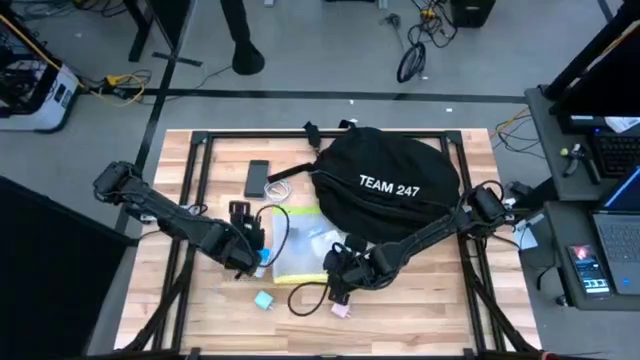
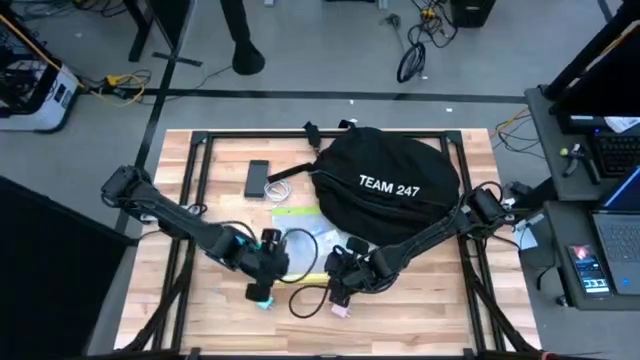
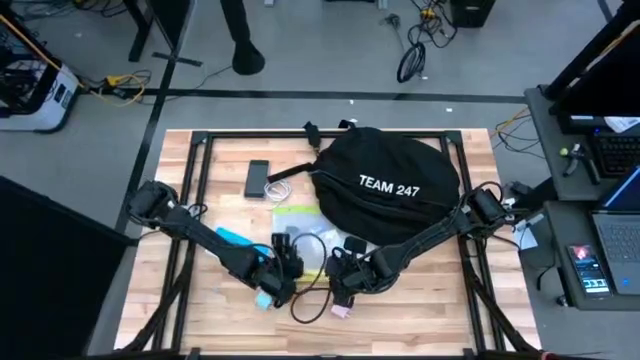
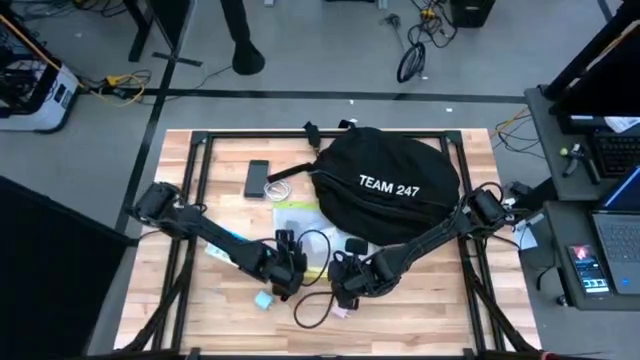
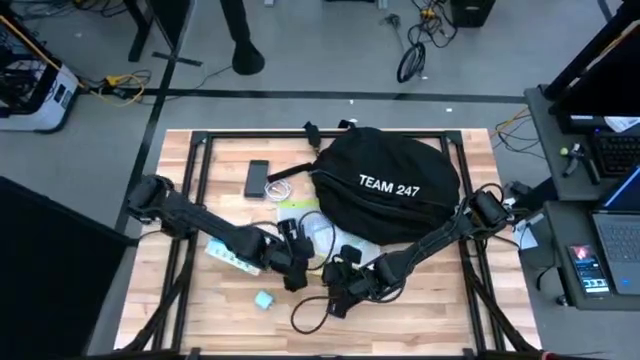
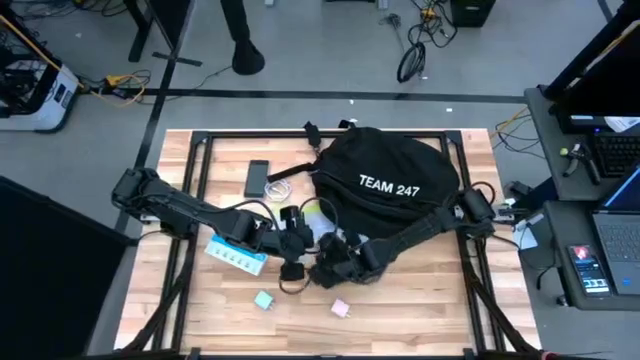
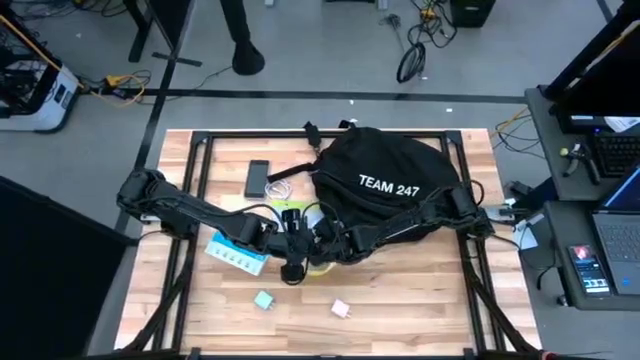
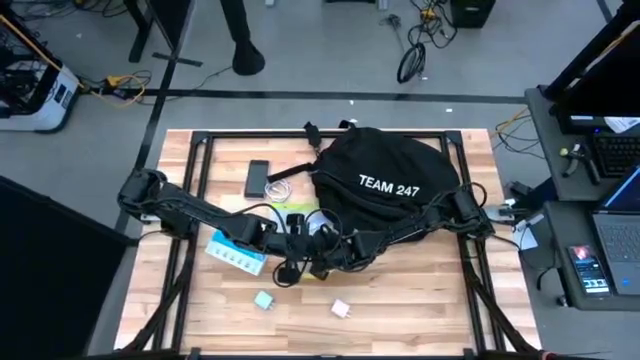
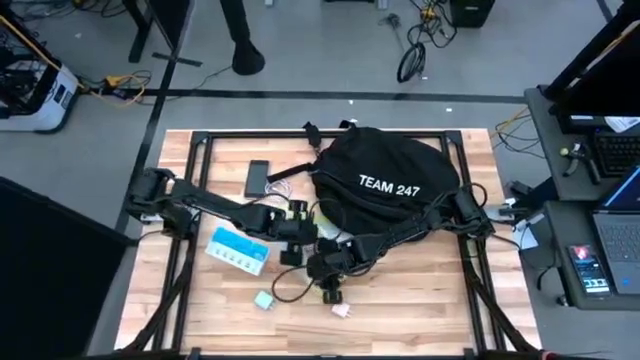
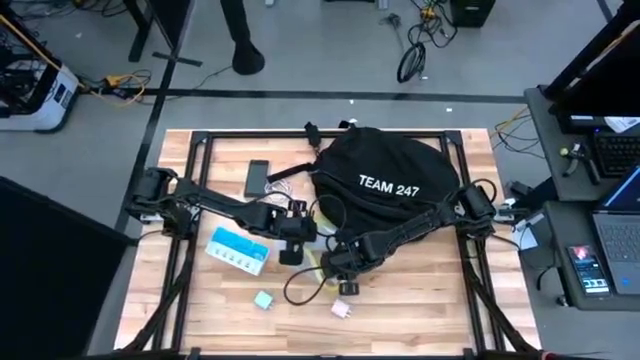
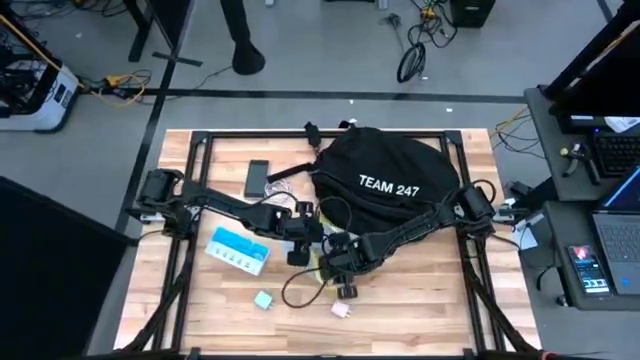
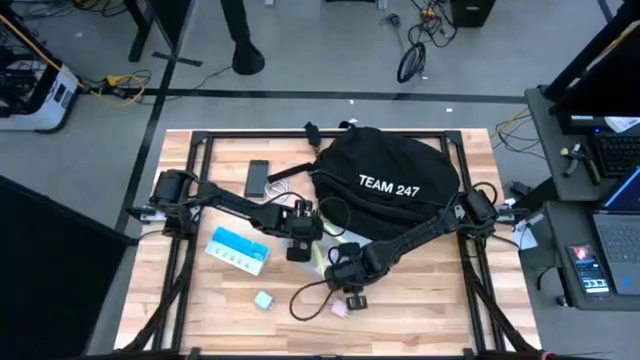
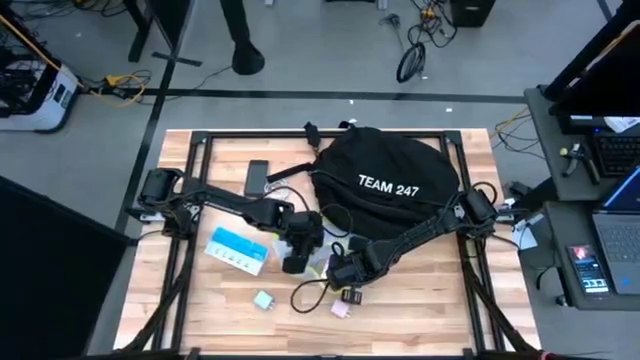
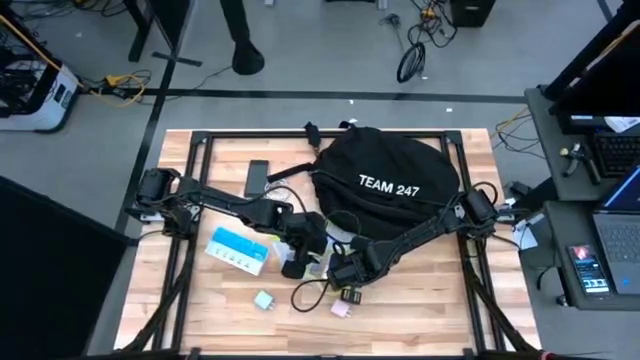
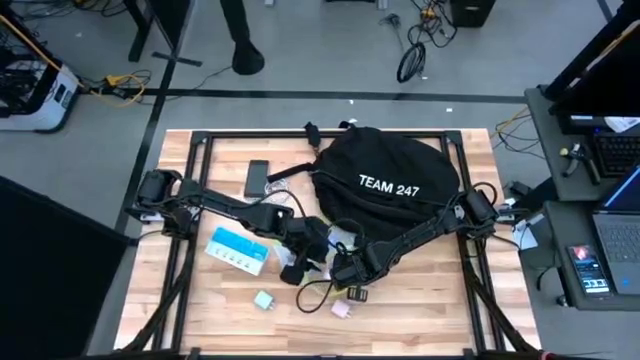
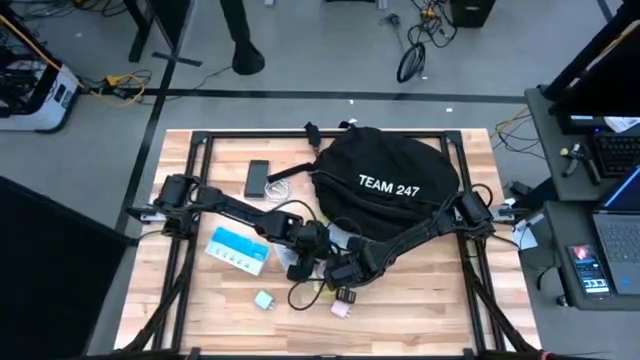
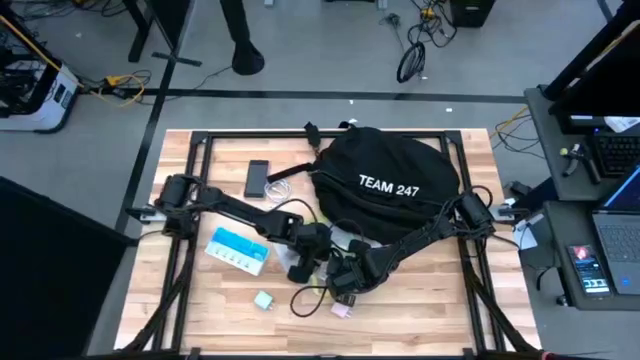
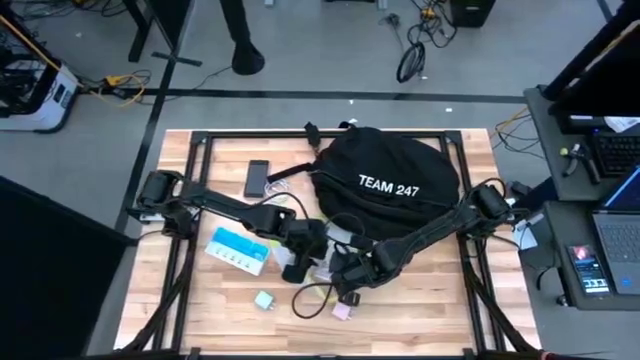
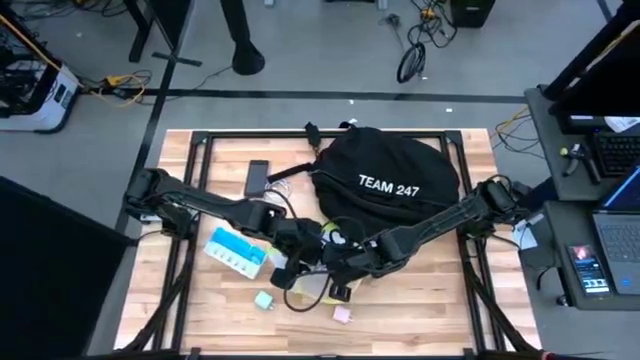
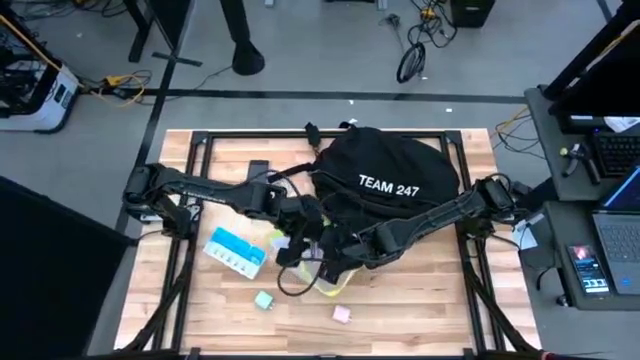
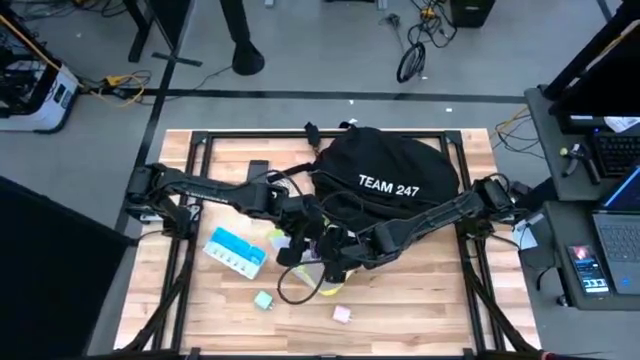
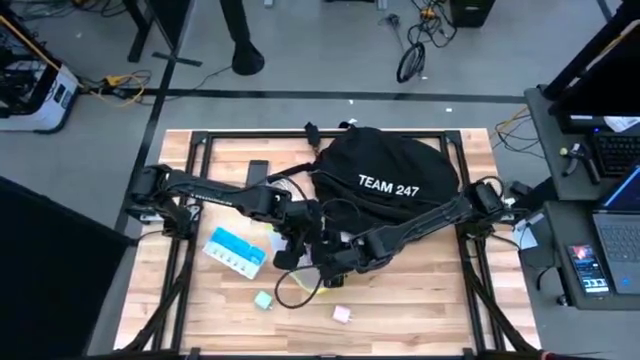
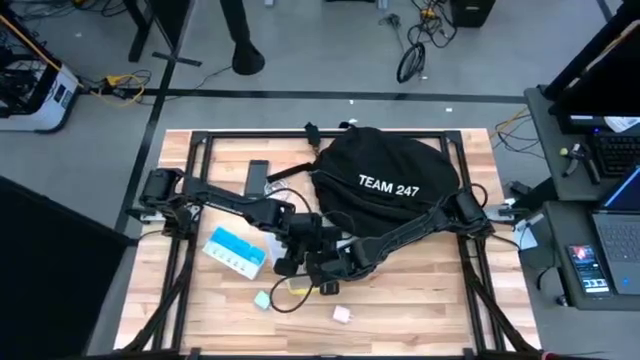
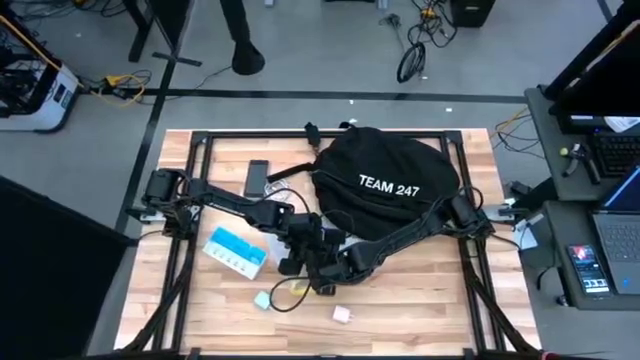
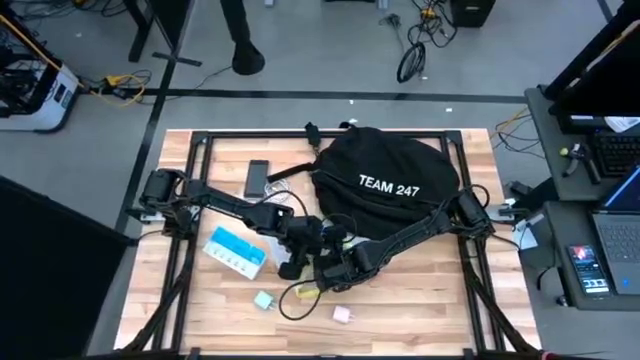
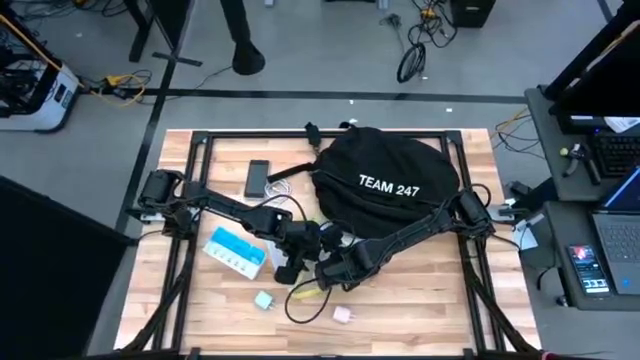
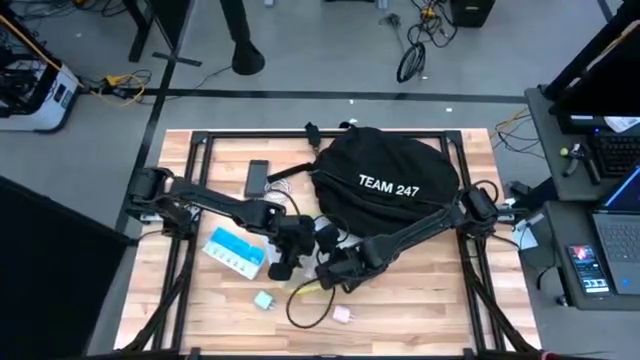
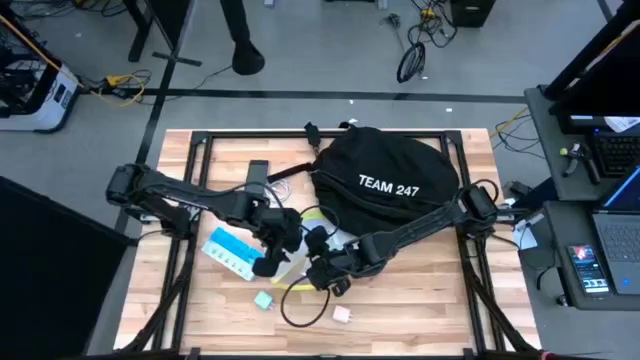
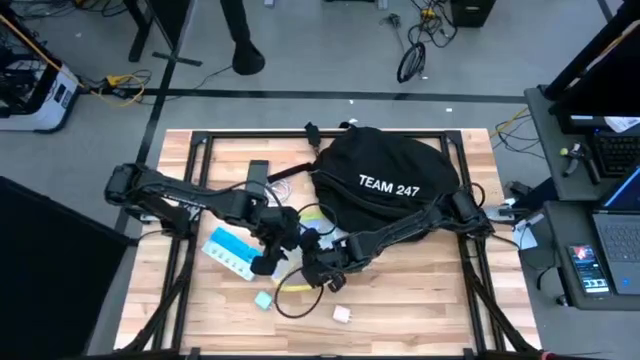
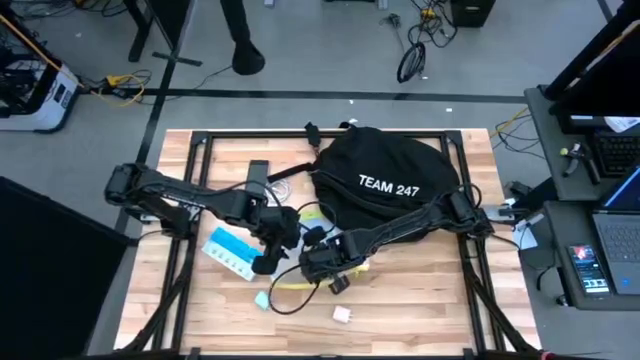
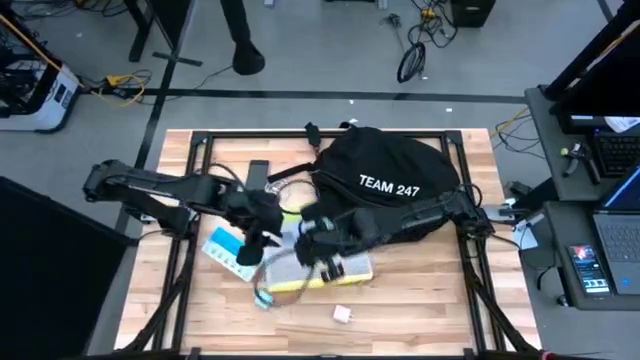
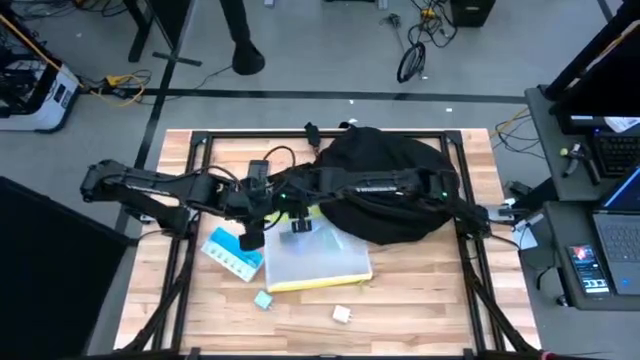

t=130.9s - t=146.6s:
Task: Unpack backpack
Remove the game card from the green zip bag

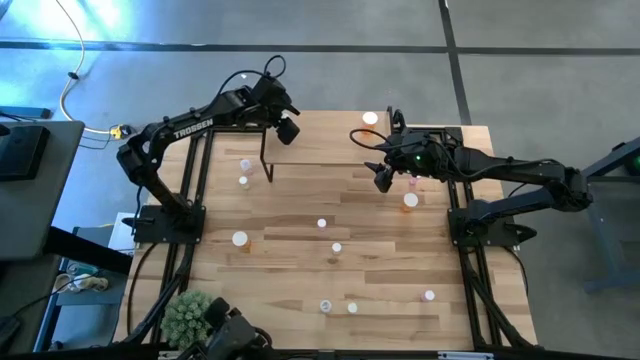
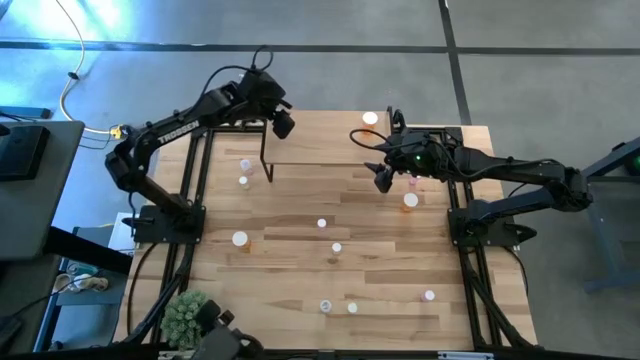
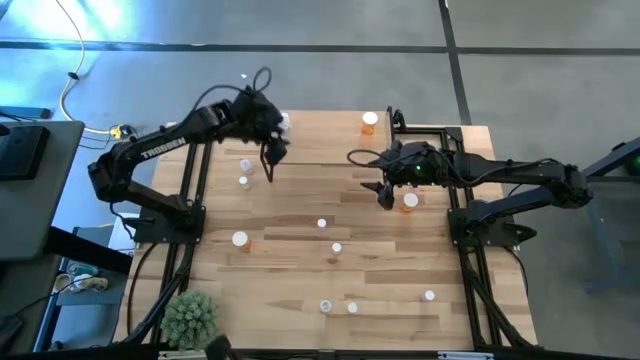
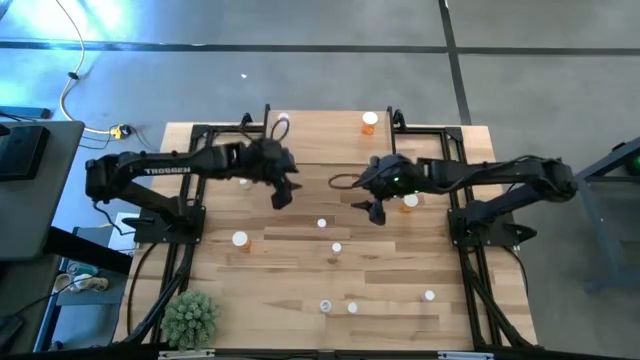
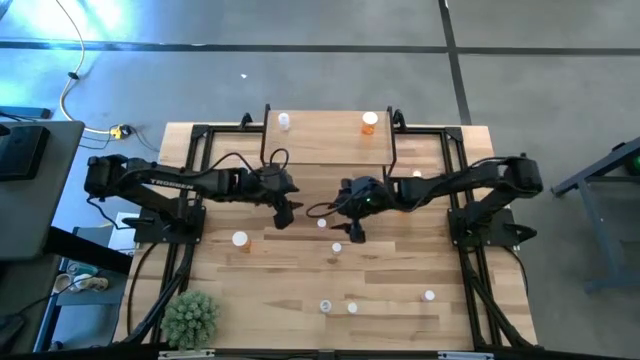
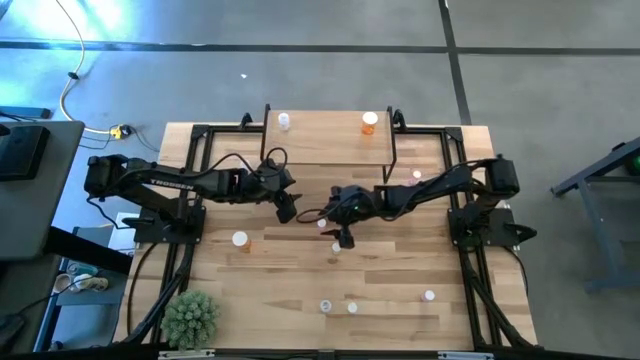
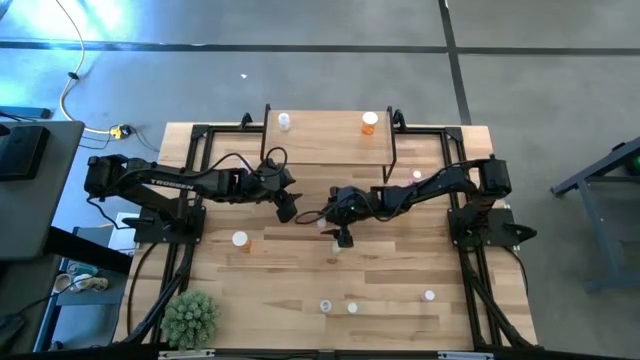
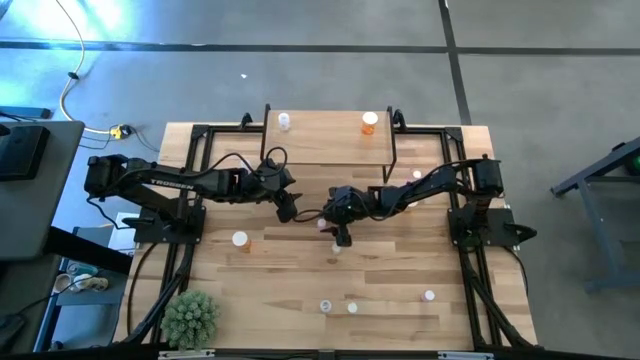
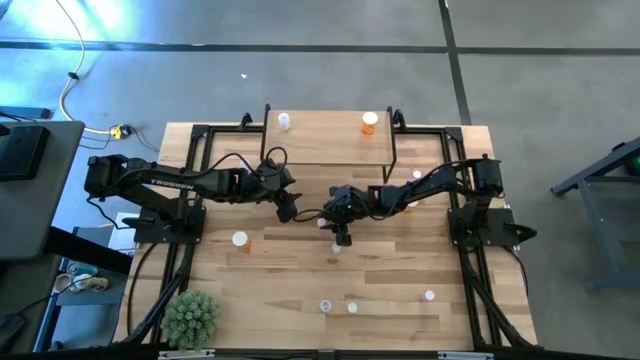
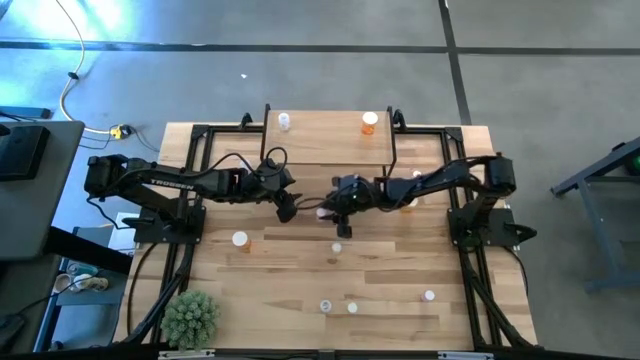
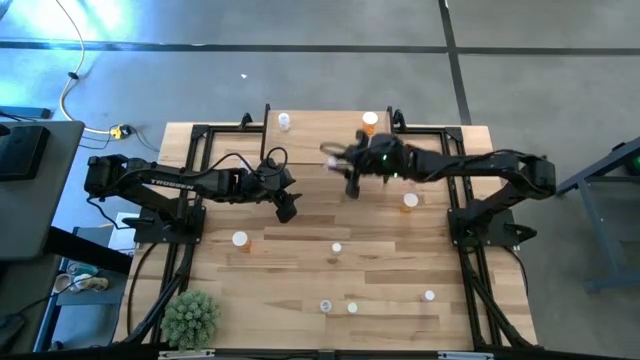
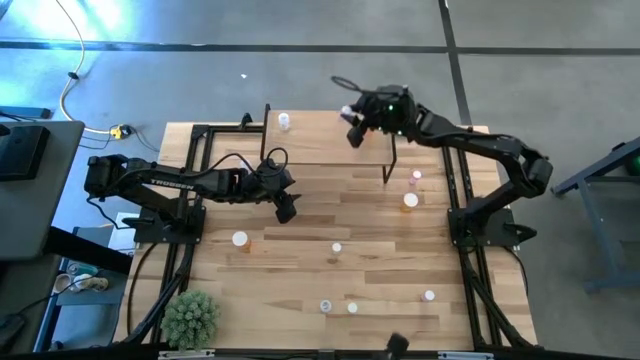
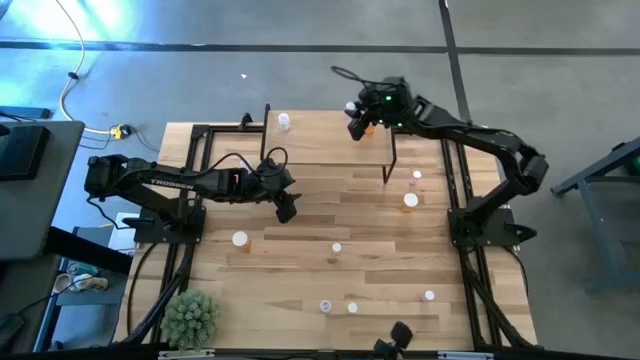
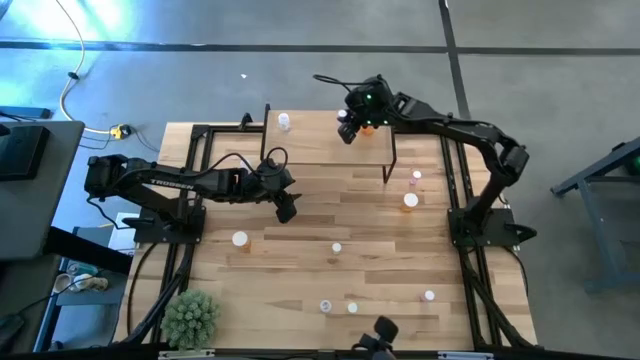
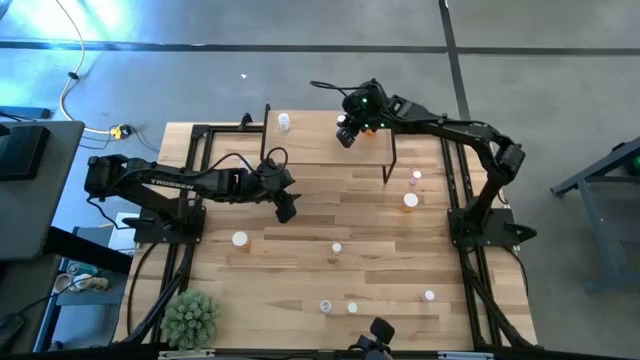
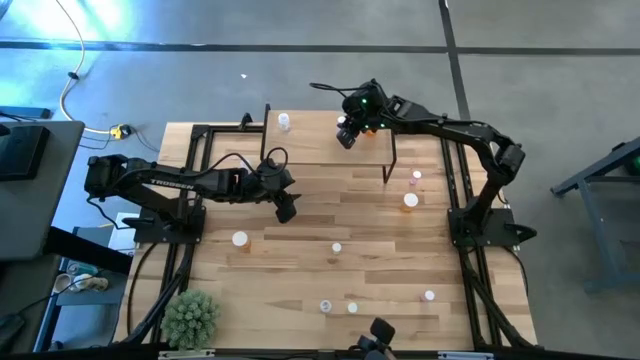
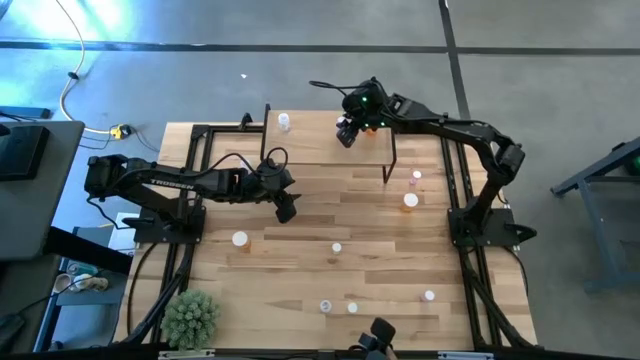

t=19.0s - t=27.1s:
Task: Pick and place medicine bottles onto shelf by color
Put the middle left pink pill bottle on the shelf
